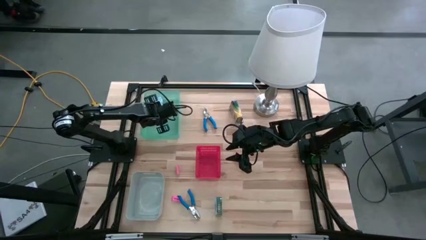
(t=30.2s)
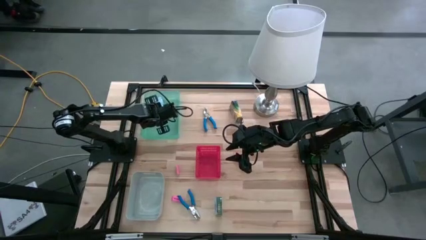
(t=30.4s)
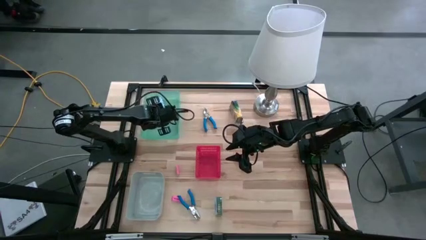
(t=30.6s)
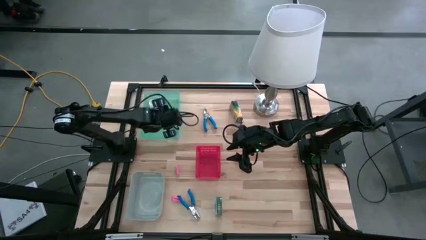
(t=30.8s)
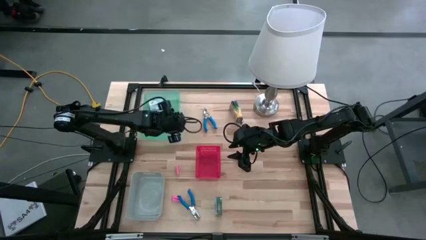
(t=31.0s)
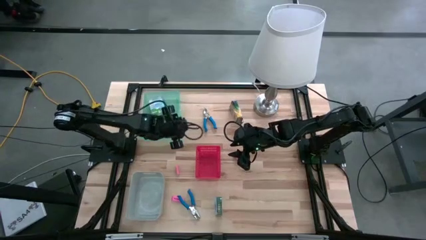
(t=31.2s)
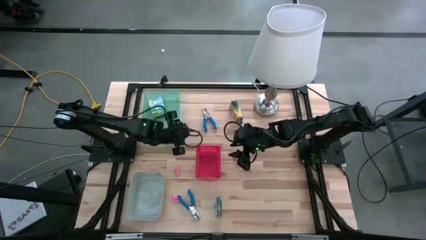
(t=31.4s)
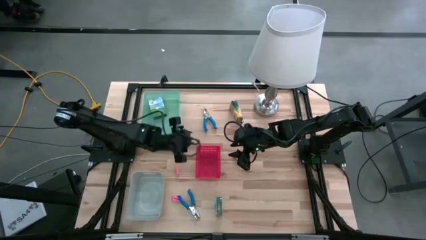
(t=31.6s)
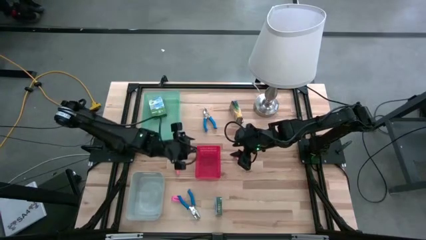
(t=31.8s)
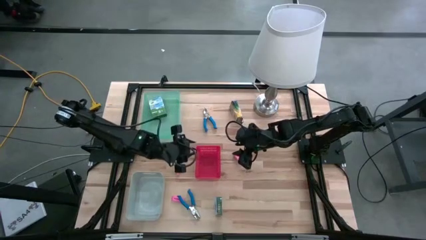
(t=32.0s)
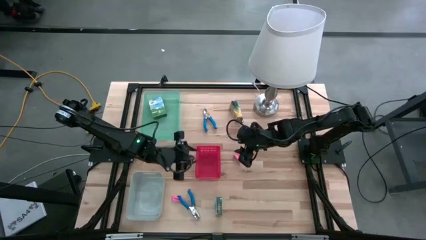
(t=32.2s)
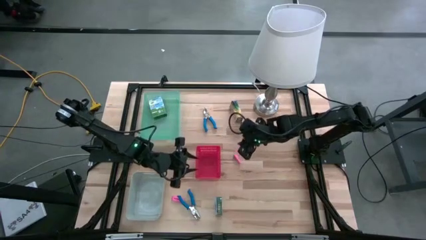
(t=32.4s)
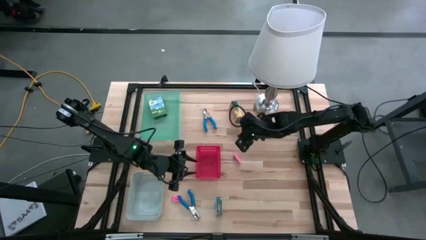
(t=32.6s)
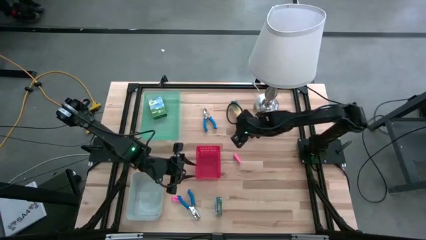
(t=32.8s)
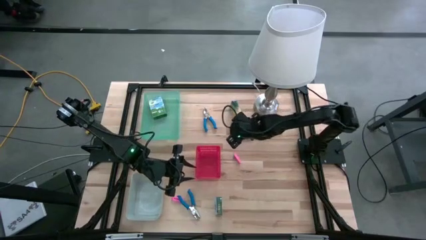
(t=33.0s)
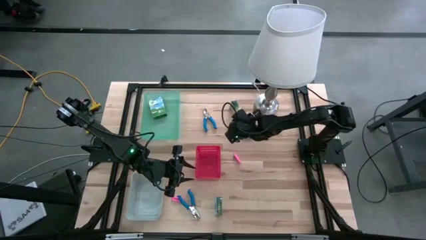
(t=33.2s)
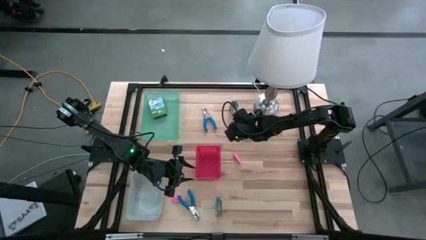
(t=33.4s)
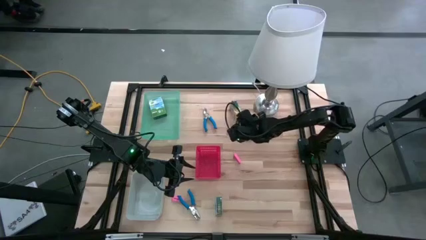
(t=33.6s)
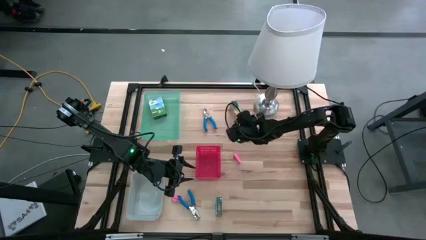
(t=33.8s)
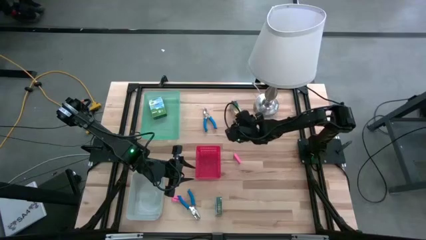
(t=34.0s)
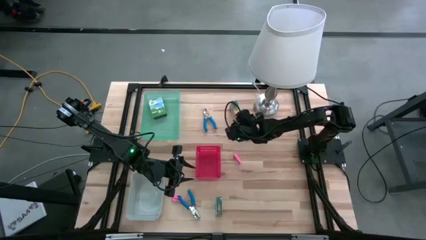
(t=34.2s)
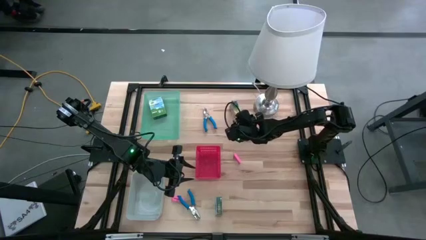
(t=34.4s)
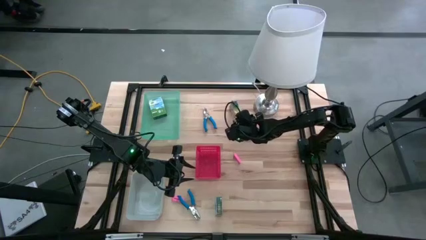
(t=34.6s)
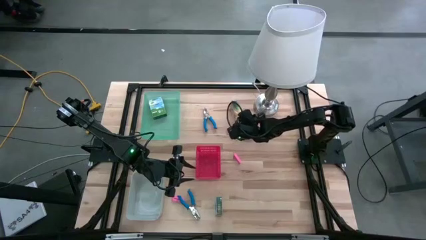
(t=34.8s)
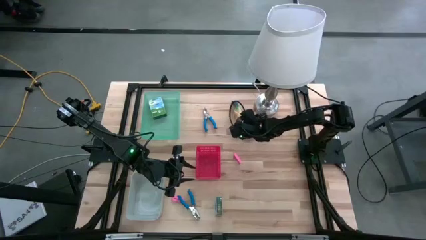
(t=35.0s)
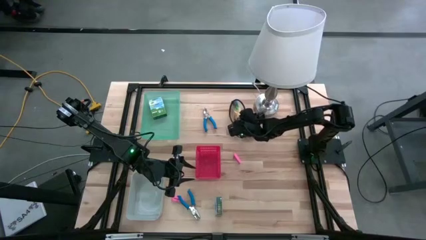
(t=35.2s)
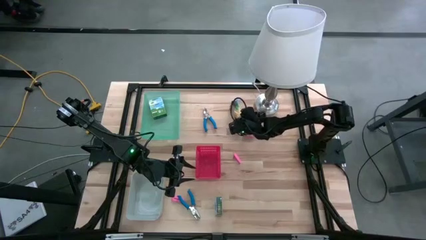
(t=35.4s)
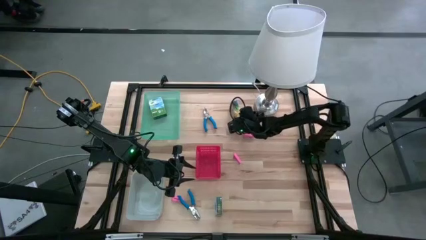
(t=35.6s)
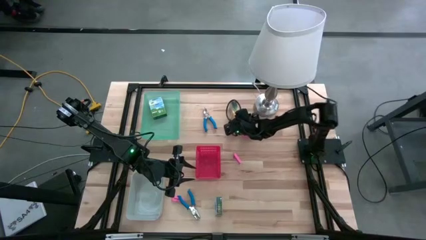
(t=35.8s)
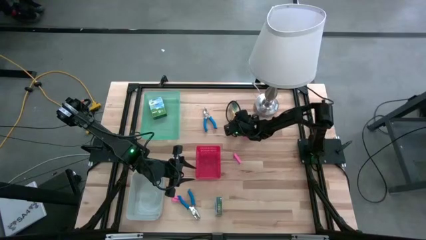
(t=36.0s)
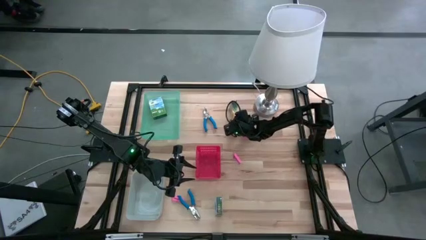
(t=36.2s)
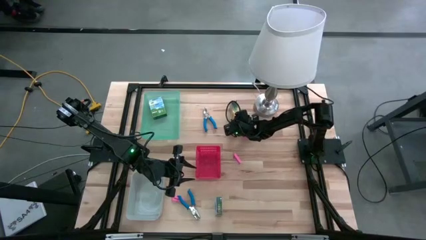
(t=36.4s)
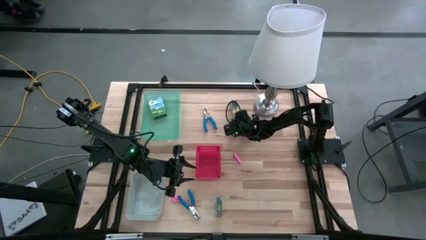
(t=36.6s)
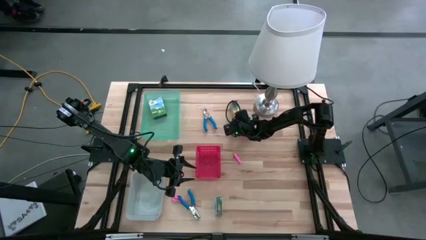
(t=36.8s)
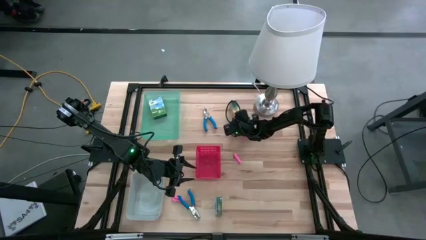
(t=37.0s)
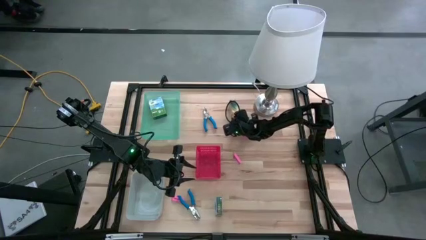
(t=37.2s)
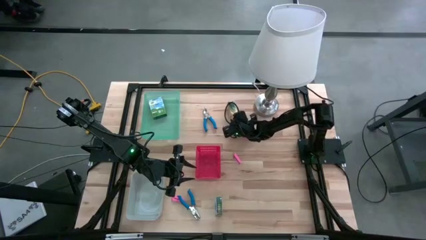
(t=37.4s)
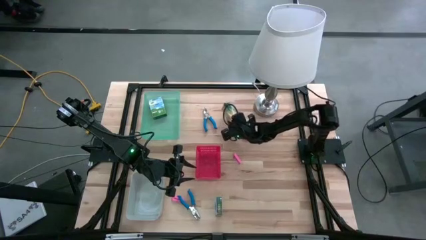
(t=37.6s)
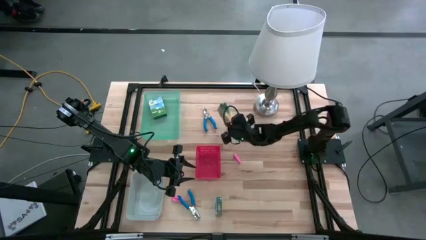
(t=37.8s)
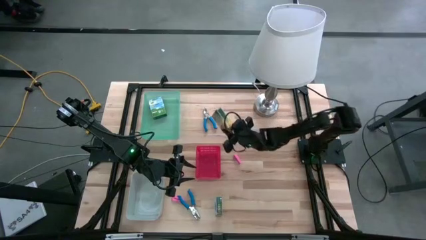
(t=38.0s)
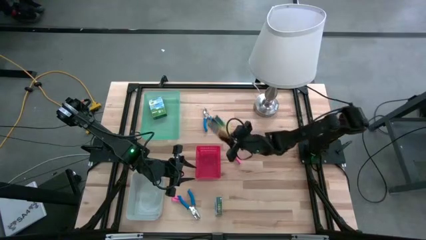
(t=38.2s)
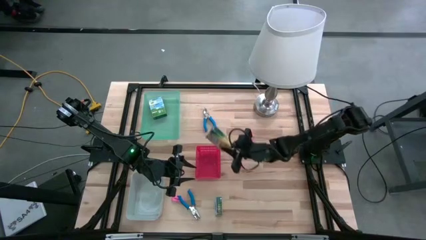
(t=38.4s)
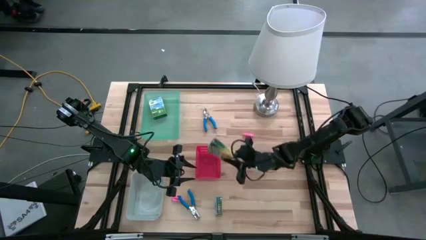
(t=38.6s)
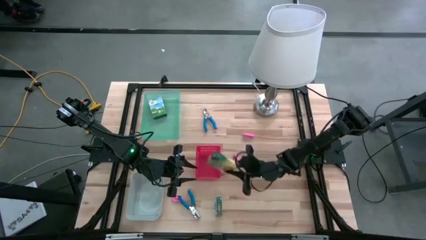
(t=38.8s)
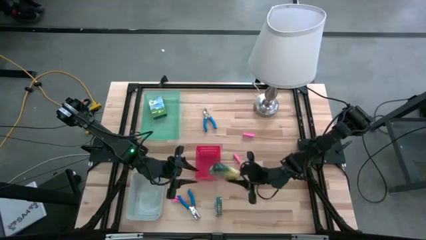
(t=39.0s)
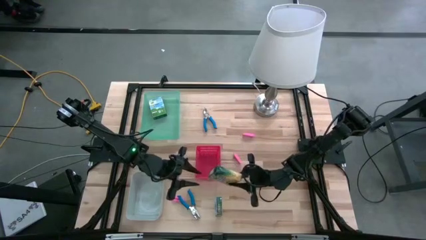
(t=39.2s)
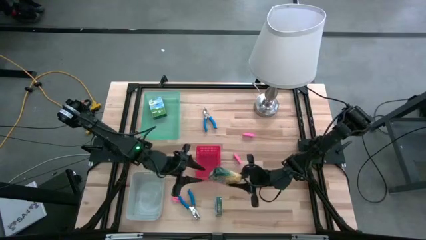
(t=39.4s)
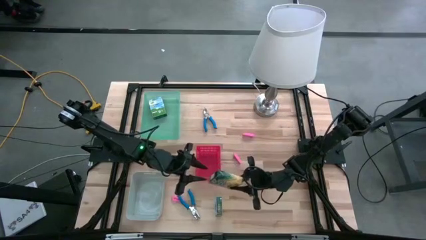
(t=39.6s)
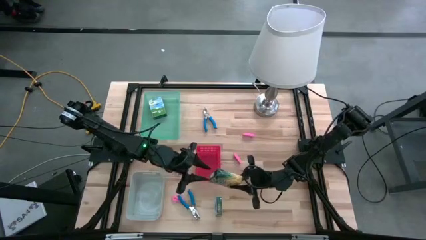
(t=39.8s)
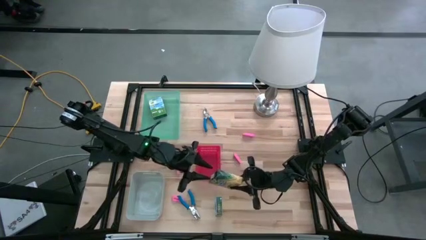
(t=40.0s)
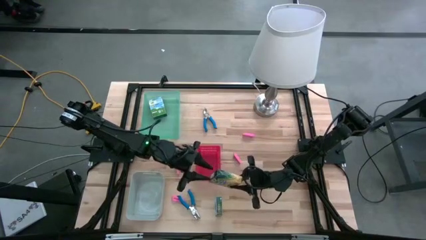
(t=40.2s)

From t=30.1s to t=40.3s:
Task: Pick & Place School Supplies
Put the top yellow crayon box into the green bin

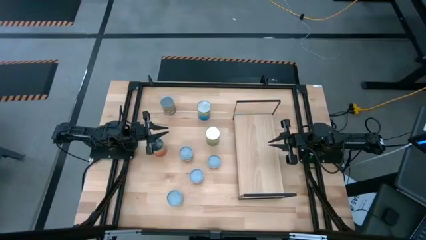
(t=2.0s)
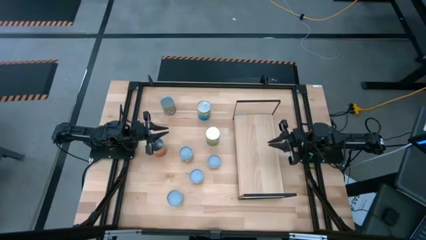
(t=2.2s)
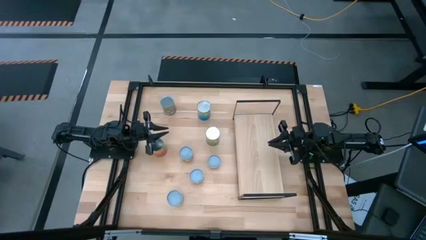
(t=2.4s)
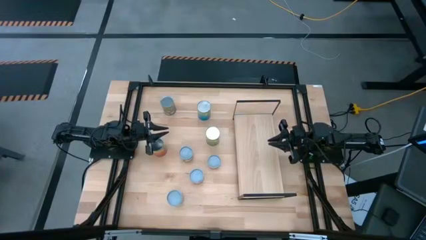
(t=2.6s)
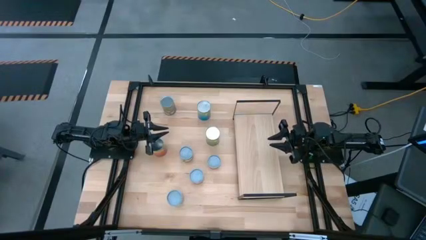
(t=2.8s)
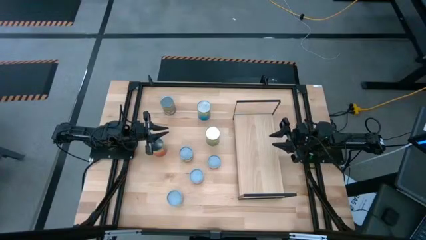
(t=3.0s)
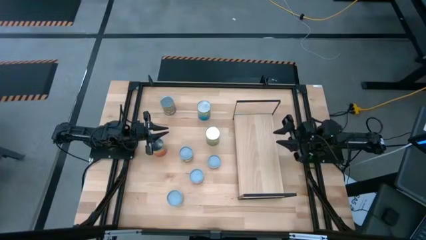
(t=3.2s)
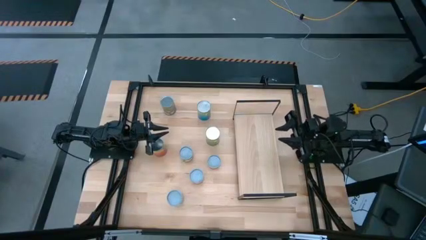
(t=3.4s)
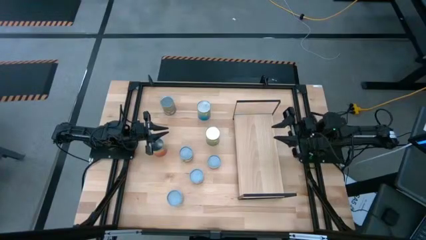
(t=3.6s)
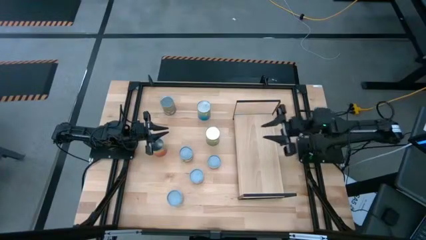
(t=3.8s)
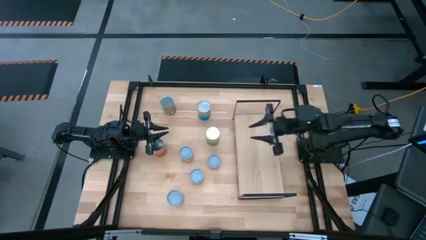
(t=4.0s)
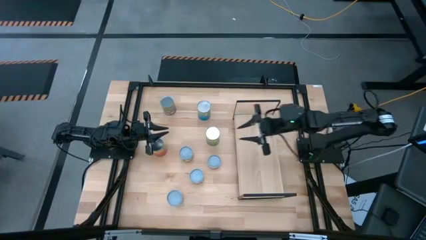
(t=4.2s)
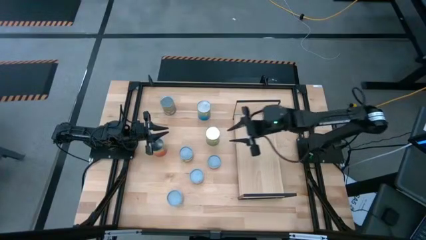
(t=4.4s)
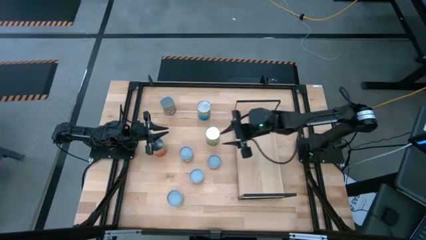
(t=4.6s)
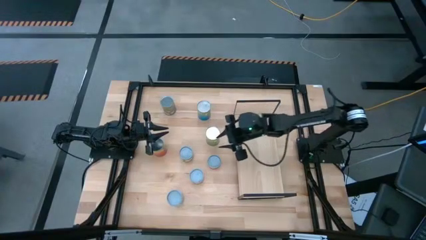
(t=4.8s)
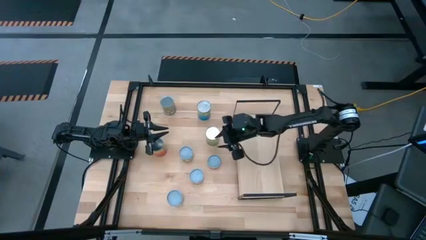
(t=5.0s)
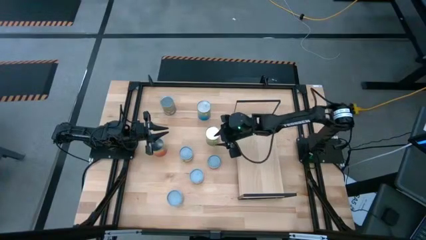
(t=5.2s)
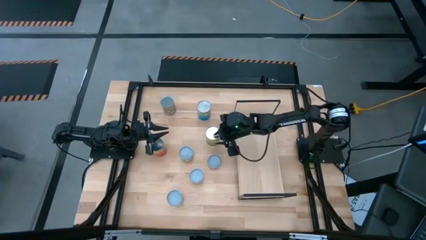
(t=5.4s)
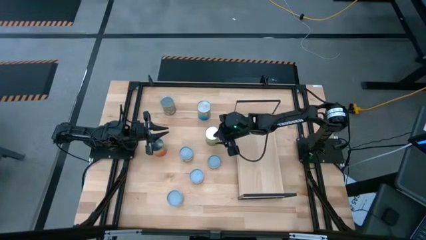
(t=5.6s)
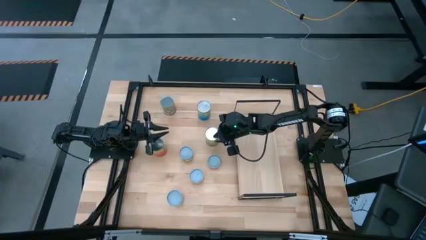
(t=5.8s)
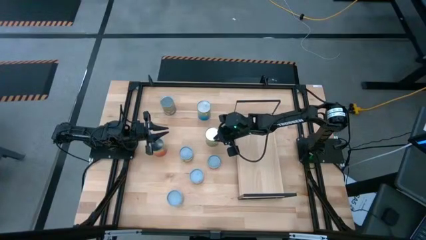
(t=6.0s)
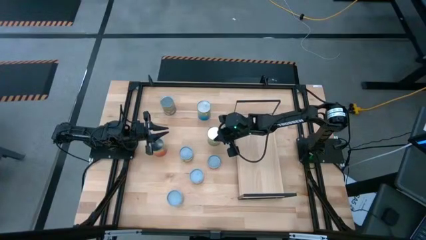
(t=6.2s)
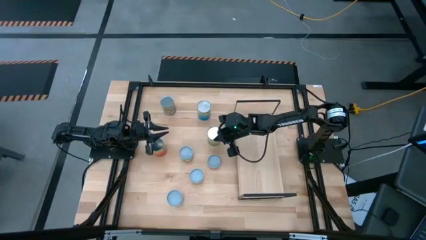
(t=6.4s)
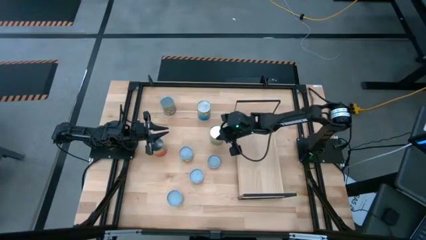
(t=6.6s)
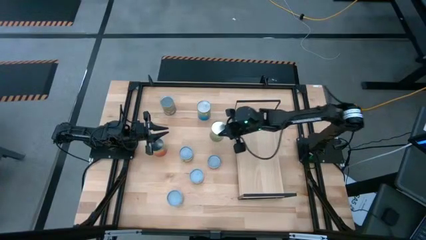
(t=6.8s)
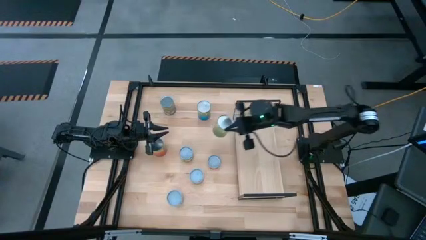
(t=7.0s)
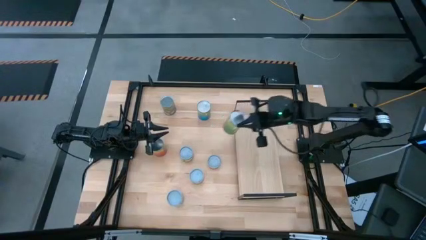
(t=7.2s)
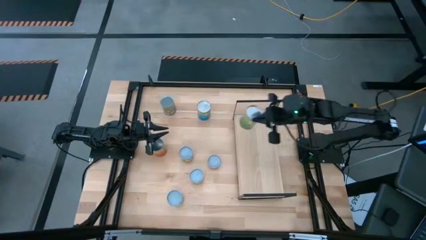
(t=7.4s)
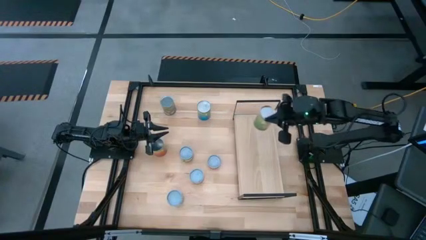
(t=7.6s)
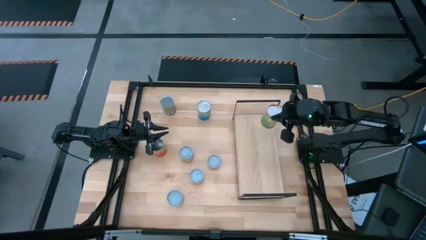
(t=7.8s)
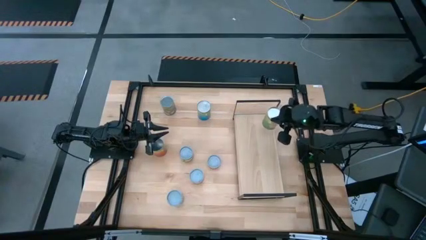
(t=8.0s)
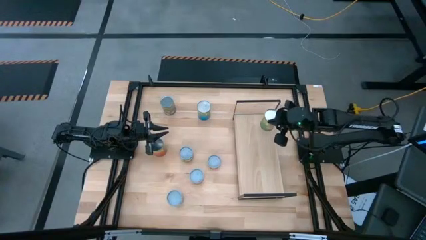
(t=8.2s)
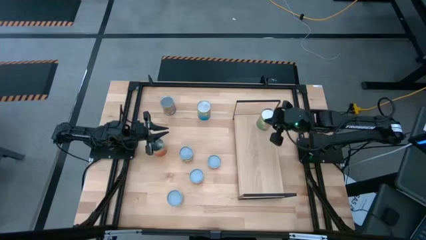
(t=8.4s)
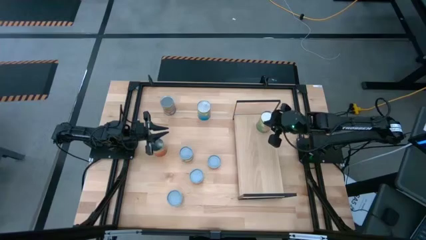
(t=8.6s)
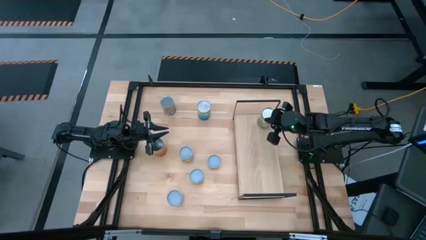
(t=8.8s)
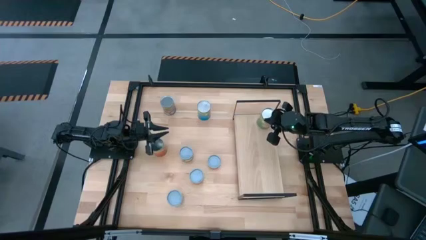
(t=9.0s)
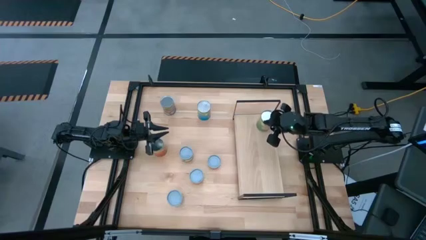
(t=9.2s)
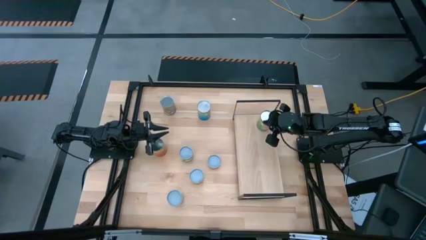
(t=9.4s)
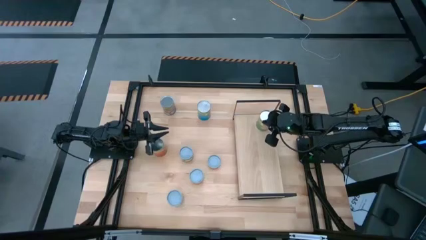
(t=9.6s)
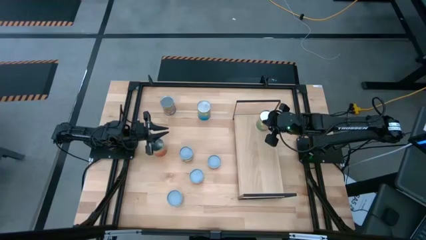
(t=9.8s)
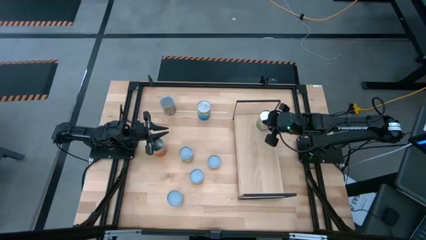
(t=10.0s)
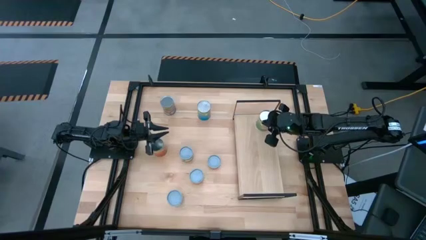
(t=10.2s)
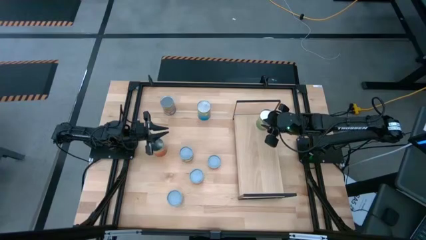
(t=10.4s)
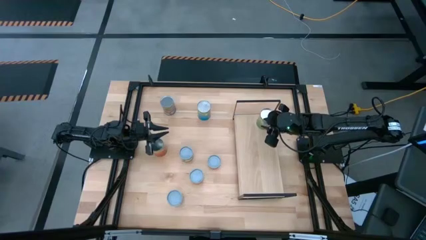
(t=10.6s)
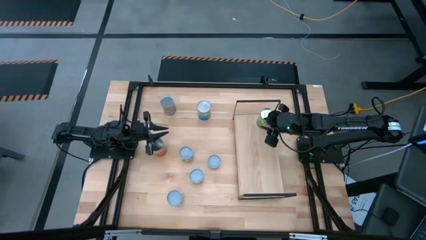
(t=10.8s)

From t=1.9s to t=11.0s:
Task: Pick and place cans onto a shelf
Put the large canned oranges on the shelf
